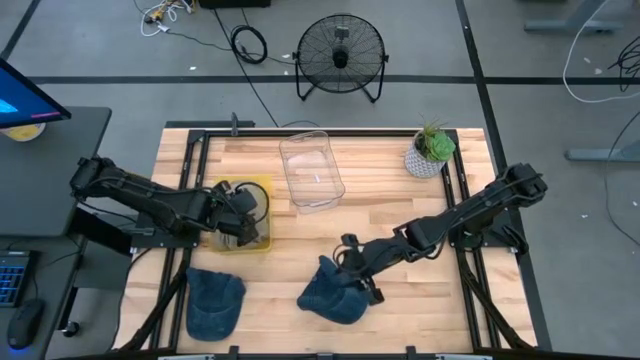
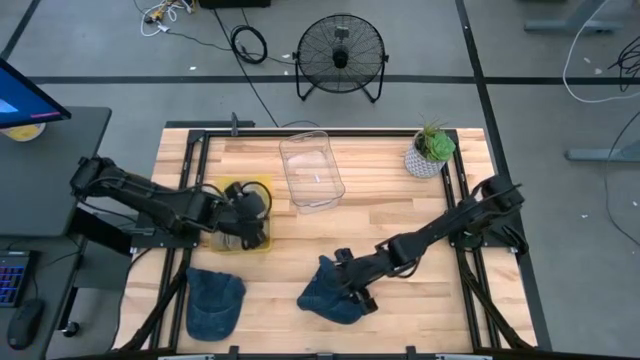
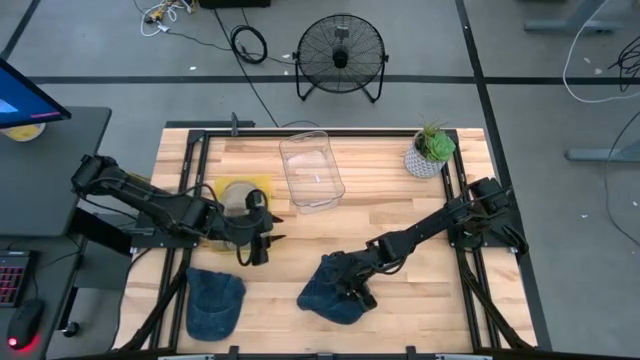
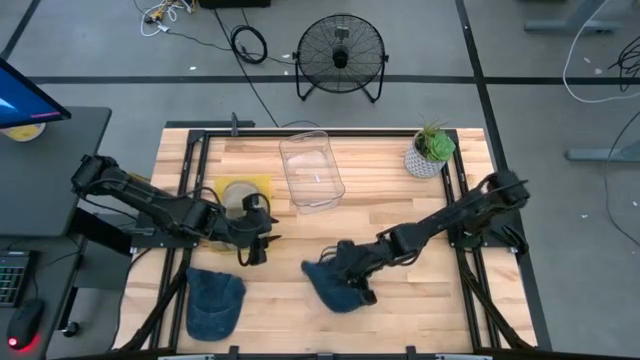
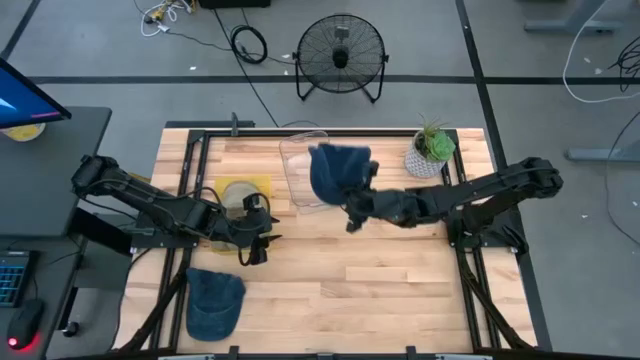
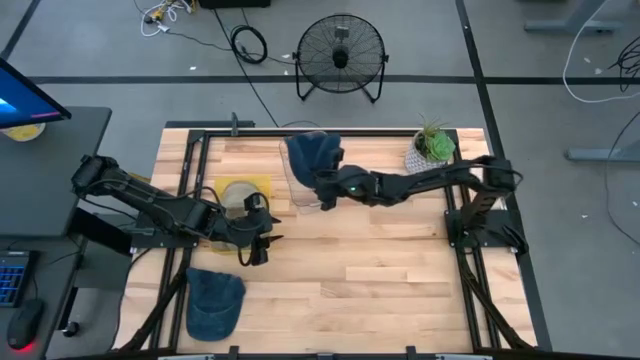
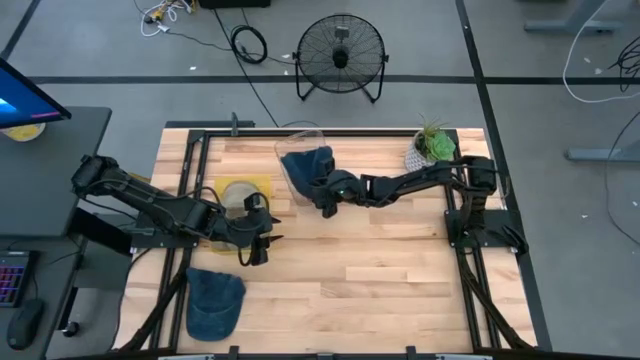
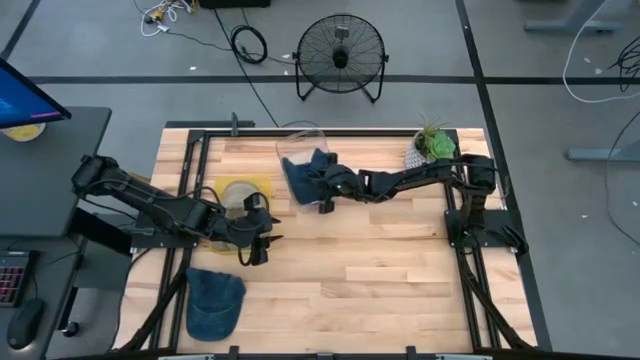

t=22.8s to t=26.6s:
Task: Pick & Place hat
Put the right blue cap into the transparent bin

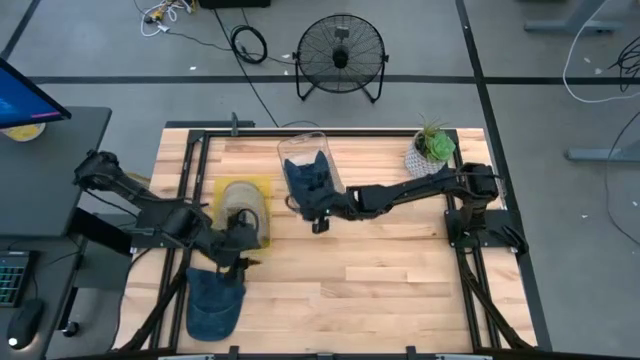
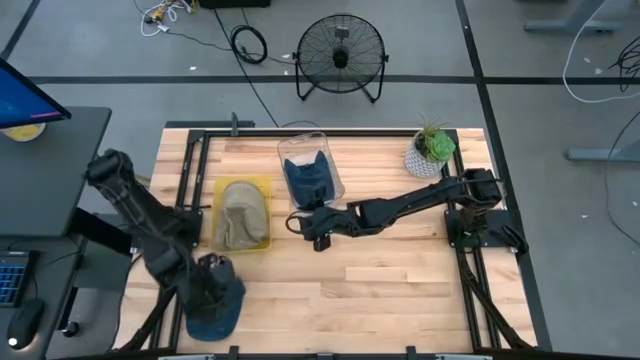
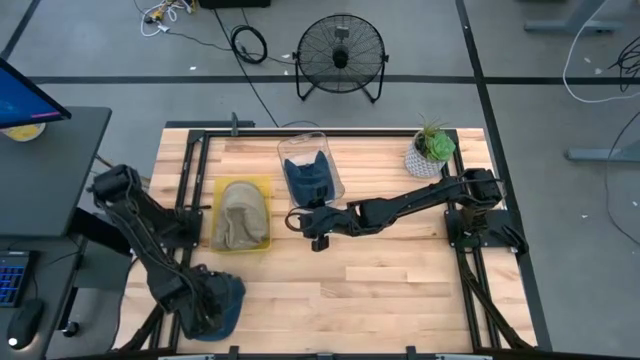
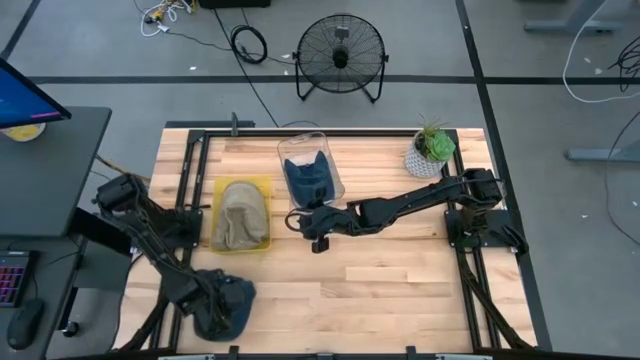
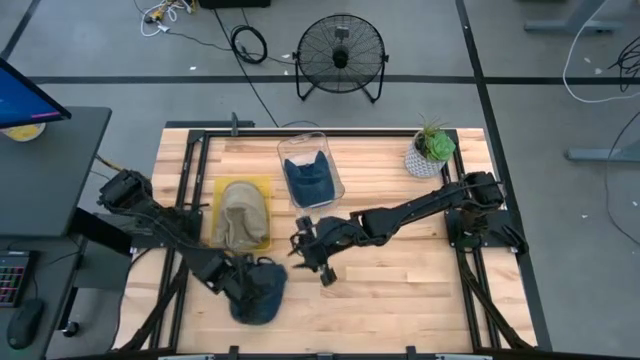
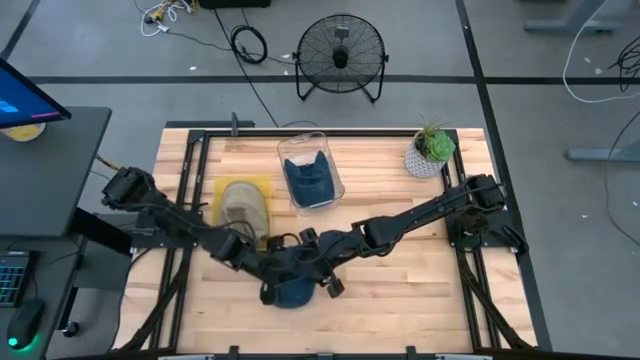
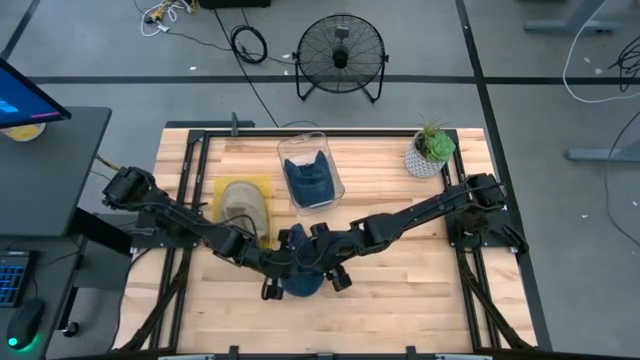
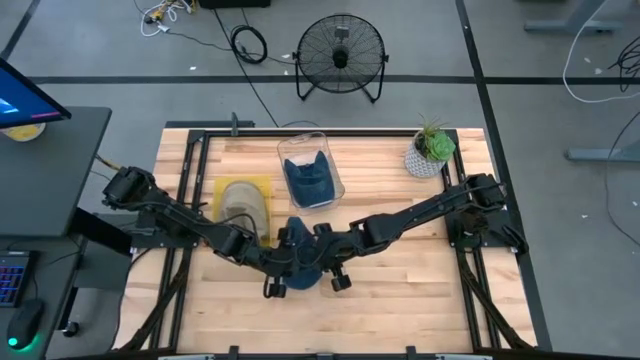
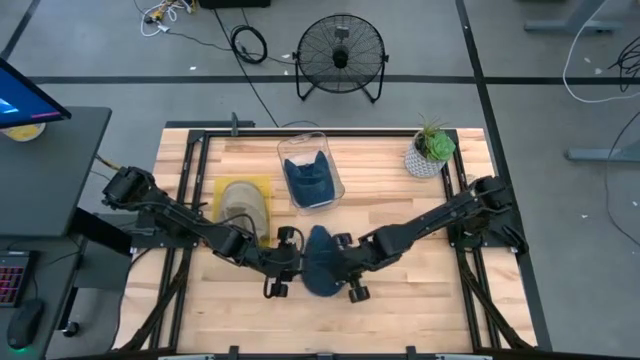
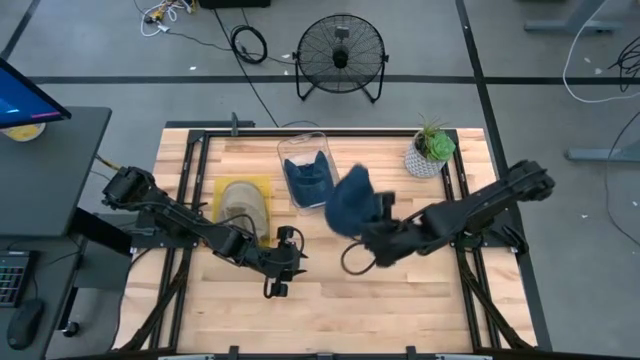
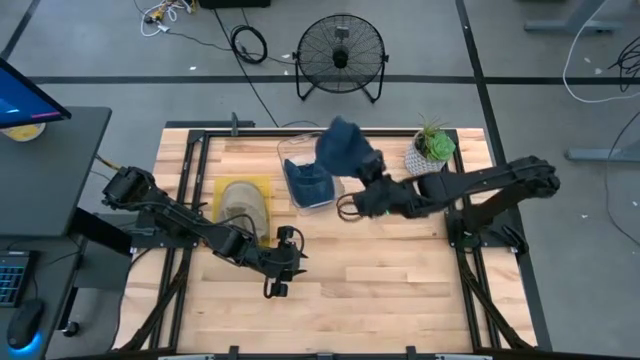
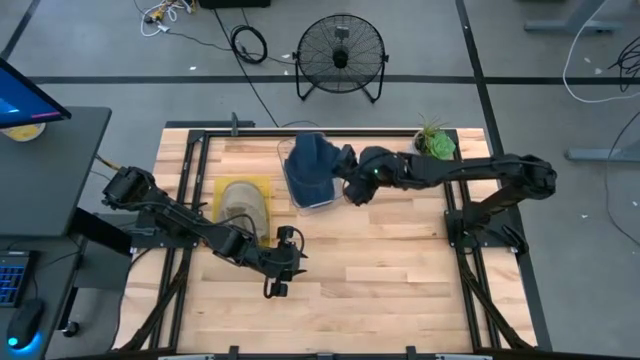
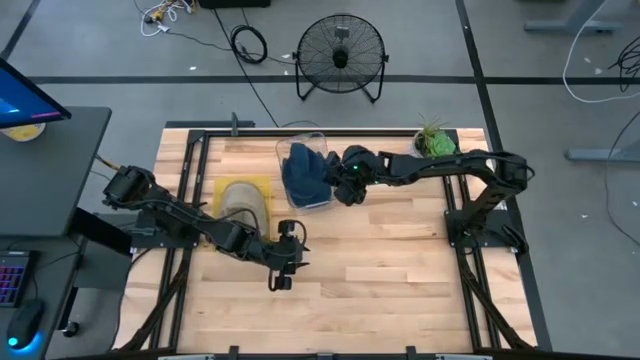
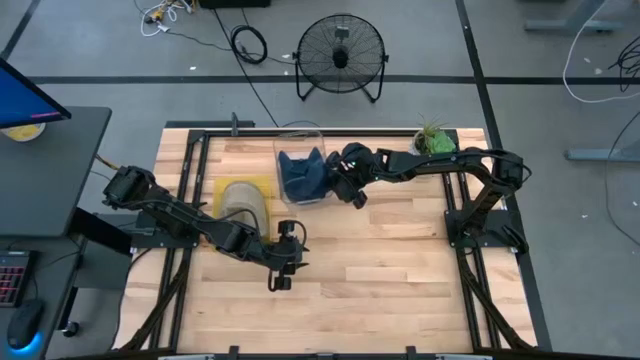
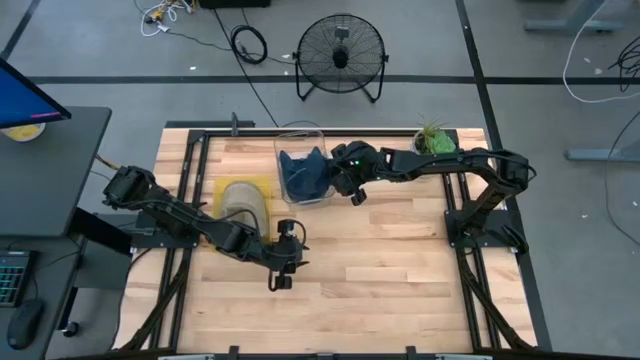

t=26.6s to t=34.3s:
Put the blue cap into the transparent bin

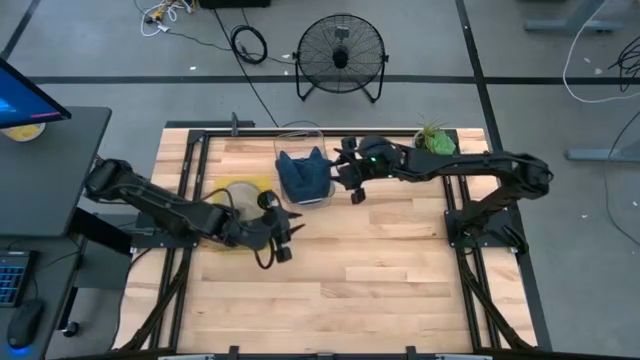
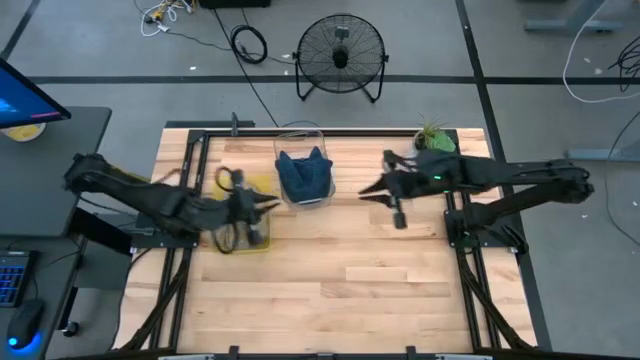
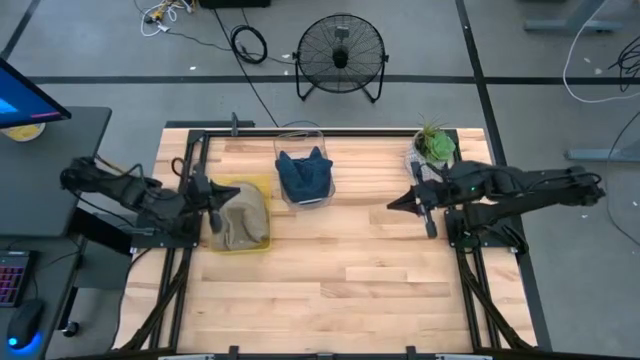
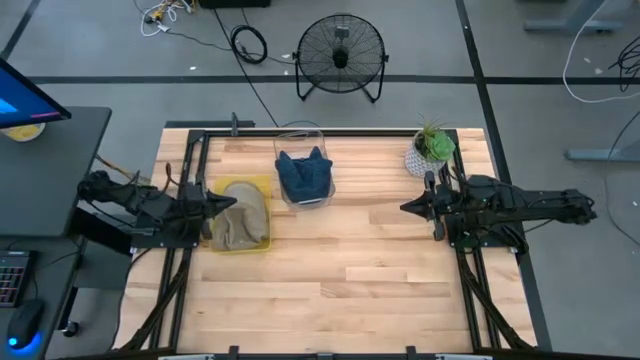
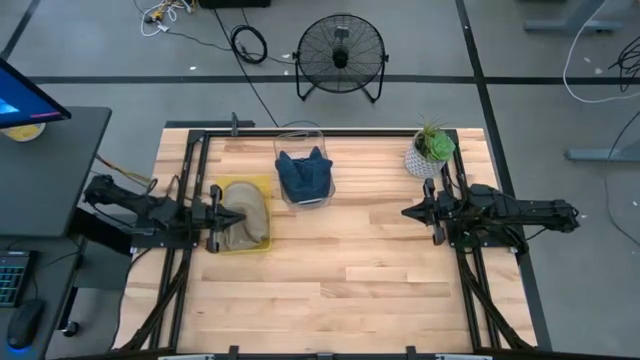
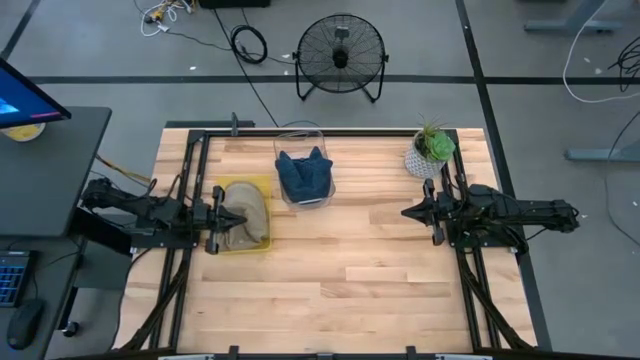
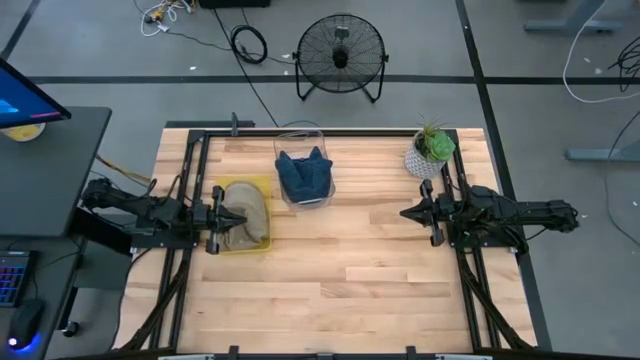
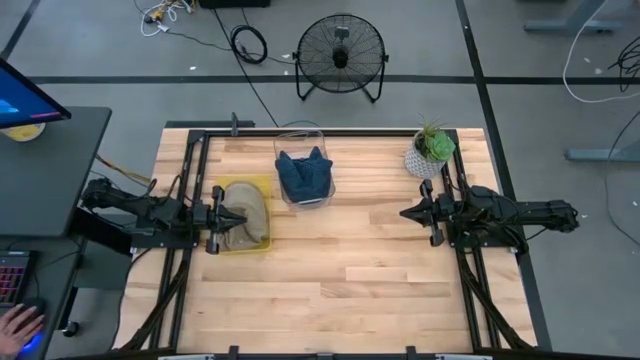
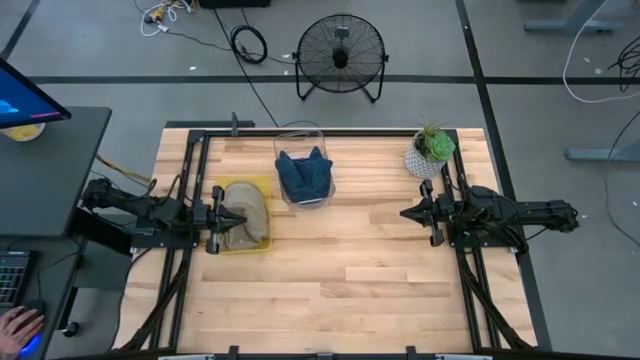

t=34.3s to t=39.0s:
Return to Home Position

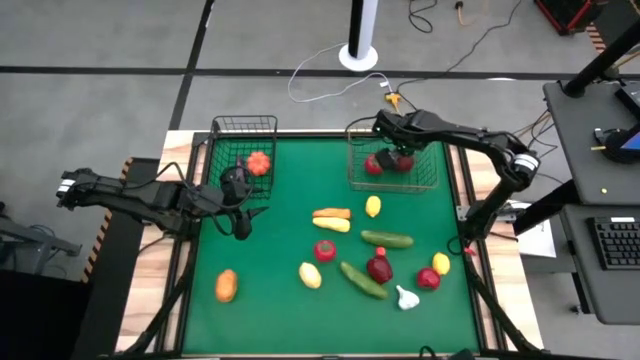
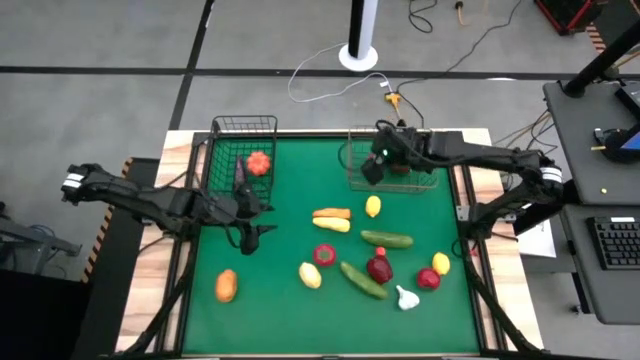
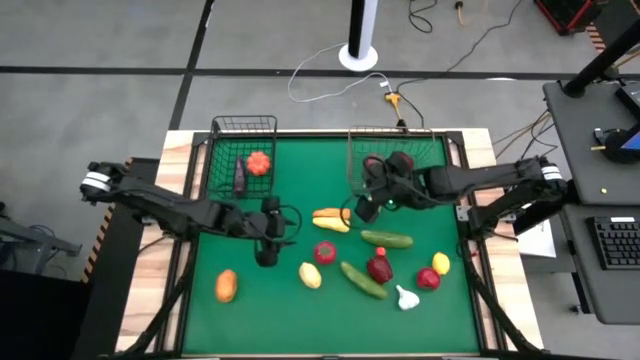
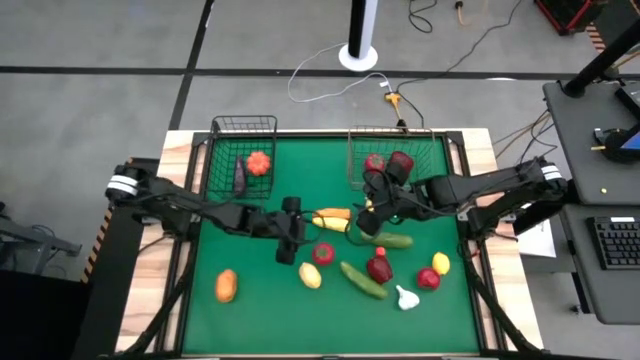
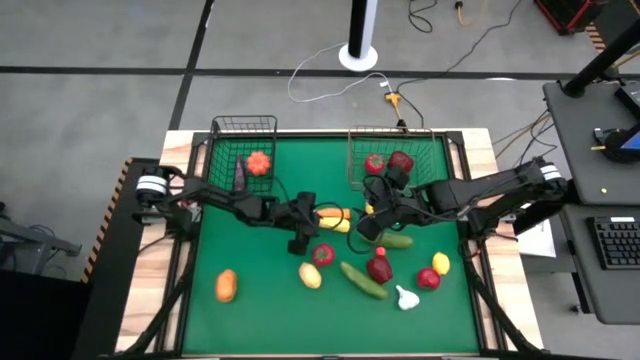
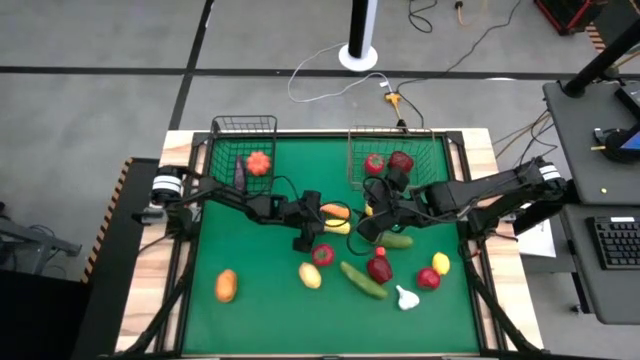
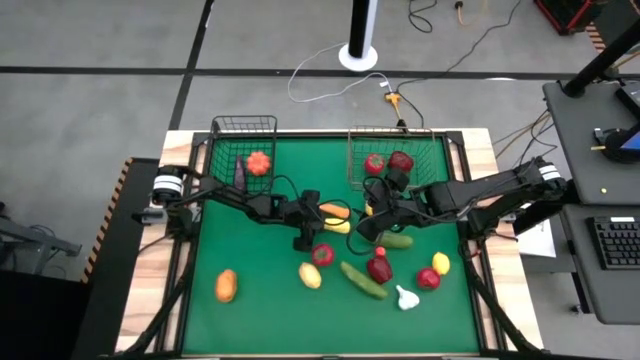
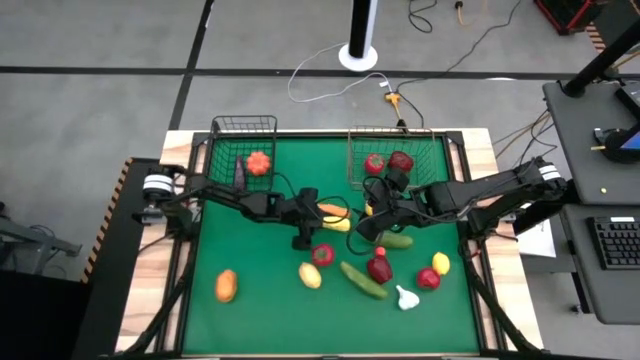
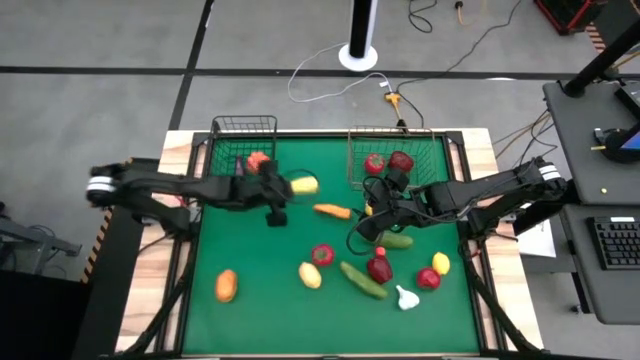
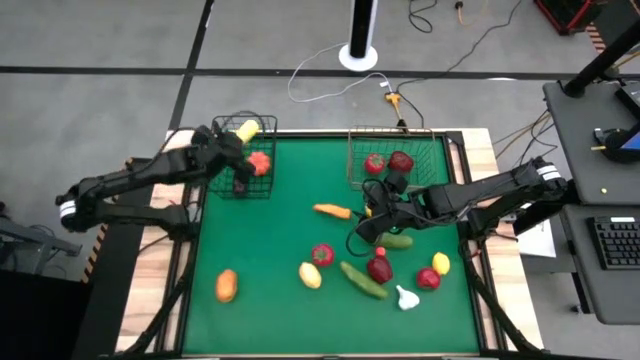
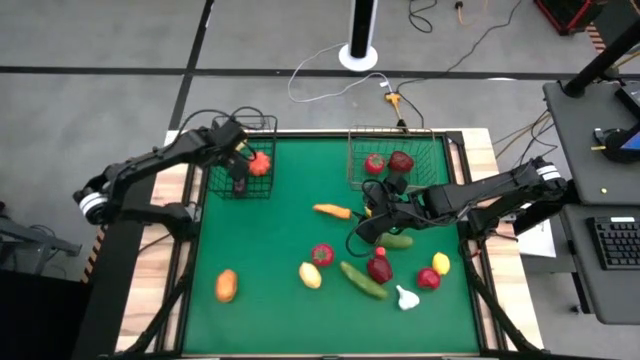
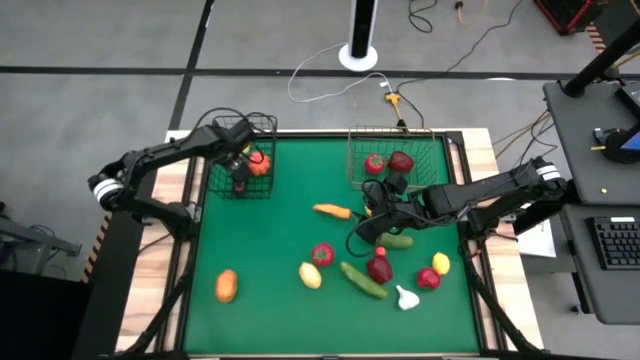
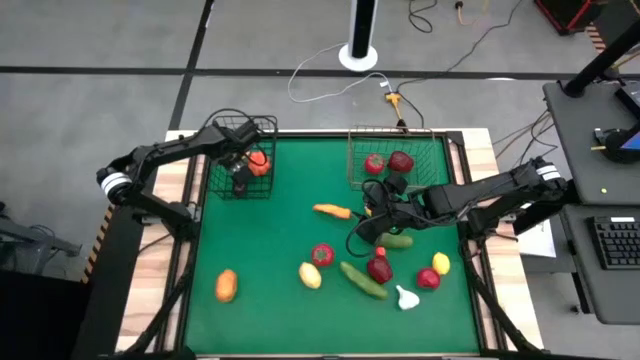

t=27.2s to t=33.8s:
Task: Sort produce into baskets
Put the yellow corn into the left wire basket
